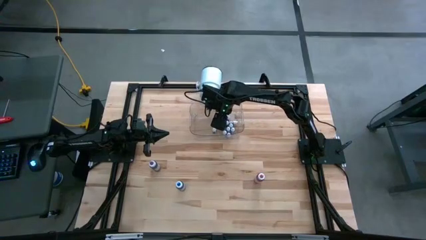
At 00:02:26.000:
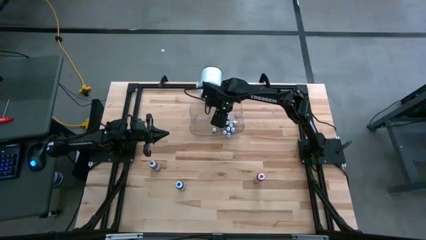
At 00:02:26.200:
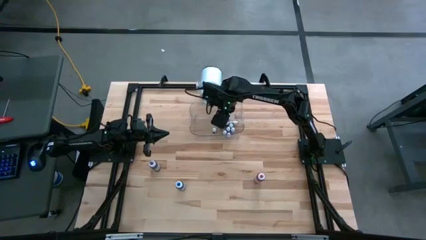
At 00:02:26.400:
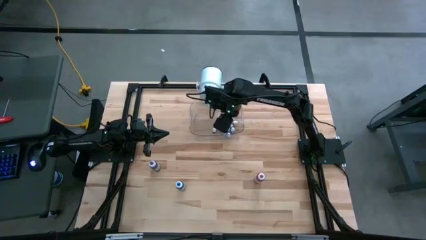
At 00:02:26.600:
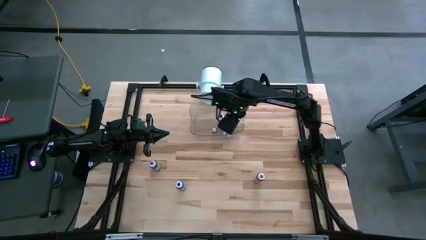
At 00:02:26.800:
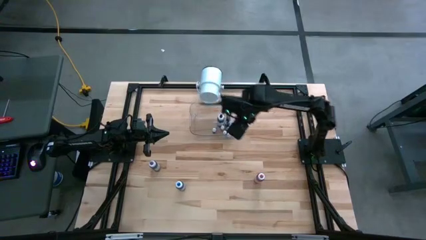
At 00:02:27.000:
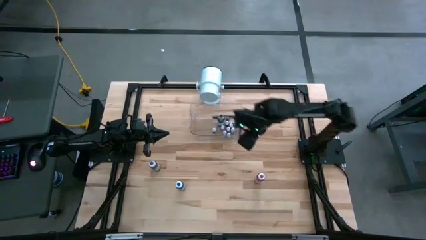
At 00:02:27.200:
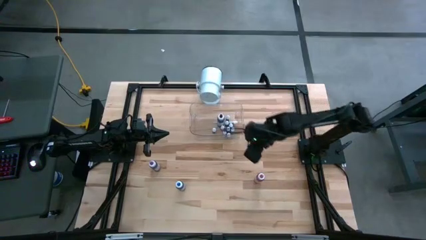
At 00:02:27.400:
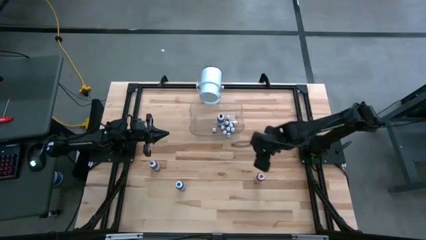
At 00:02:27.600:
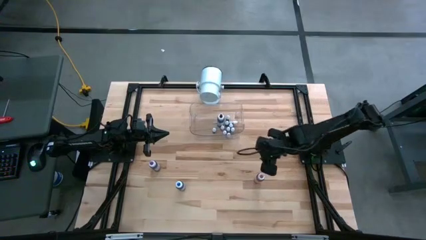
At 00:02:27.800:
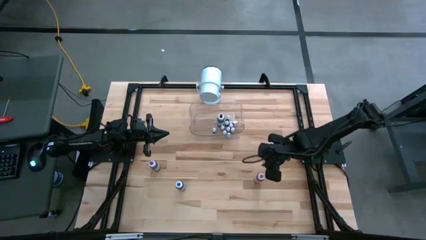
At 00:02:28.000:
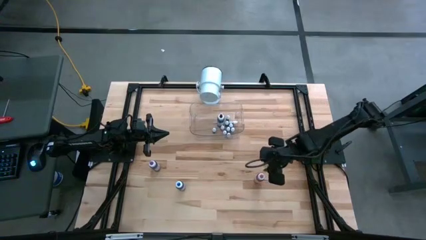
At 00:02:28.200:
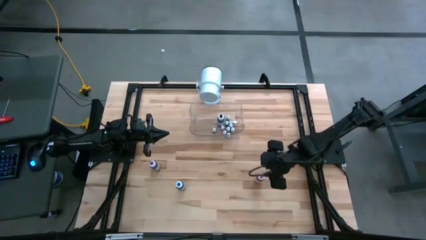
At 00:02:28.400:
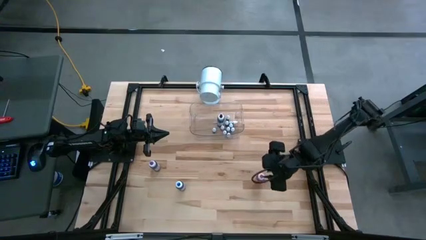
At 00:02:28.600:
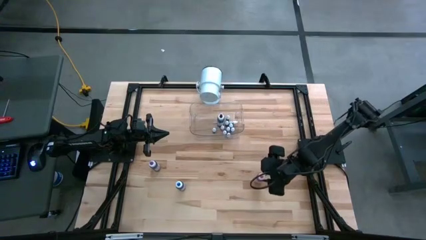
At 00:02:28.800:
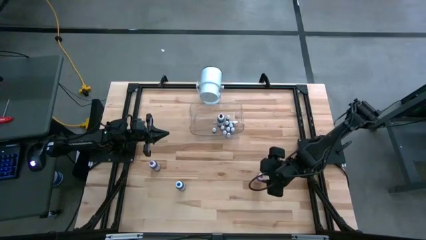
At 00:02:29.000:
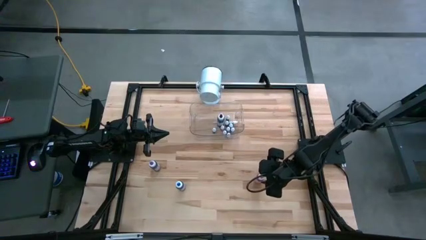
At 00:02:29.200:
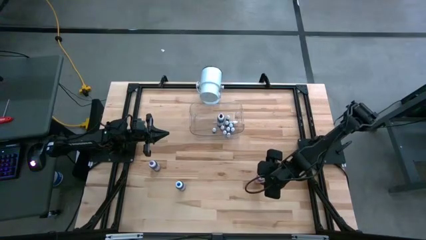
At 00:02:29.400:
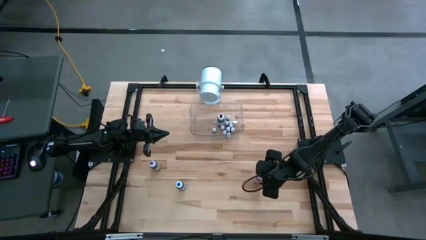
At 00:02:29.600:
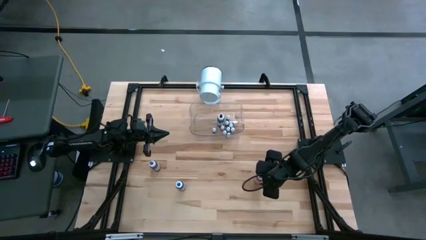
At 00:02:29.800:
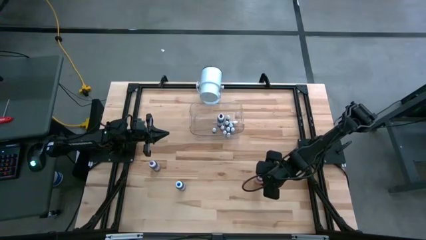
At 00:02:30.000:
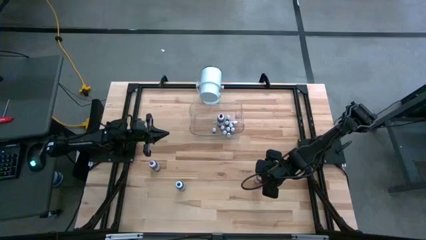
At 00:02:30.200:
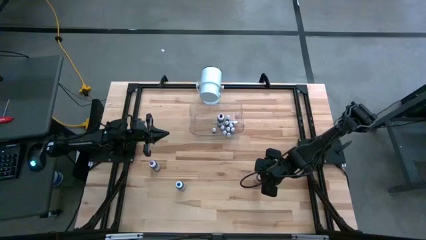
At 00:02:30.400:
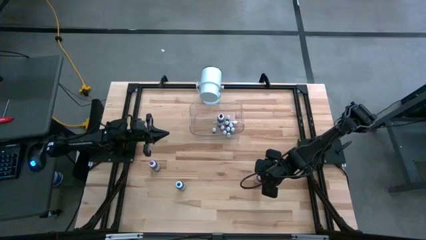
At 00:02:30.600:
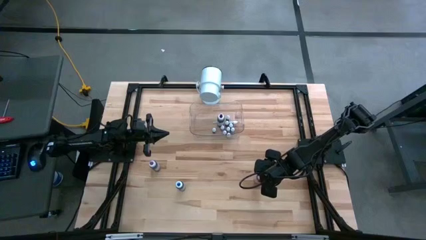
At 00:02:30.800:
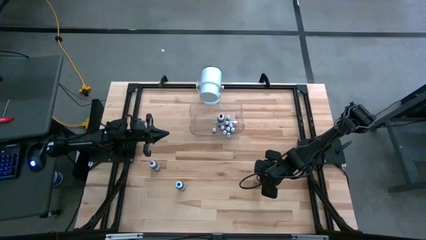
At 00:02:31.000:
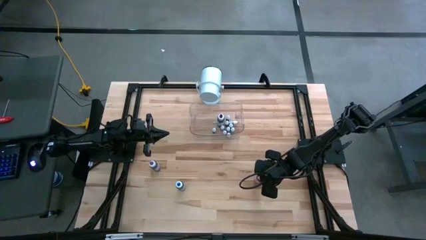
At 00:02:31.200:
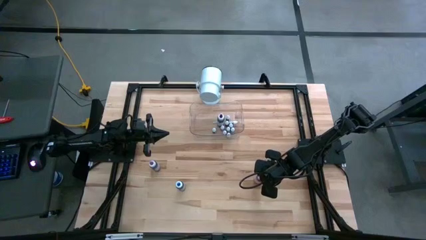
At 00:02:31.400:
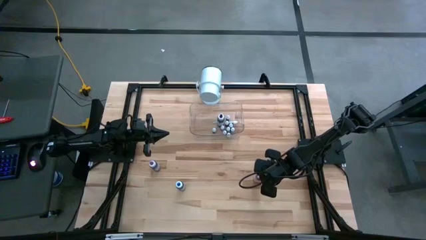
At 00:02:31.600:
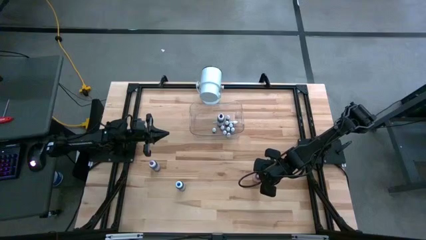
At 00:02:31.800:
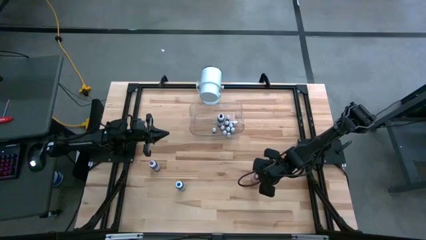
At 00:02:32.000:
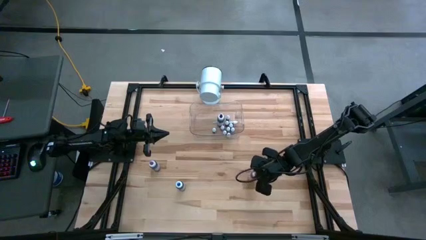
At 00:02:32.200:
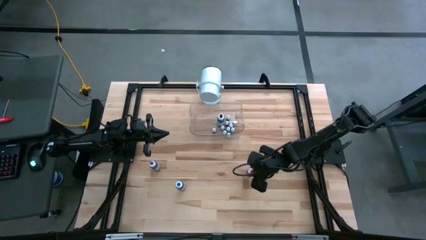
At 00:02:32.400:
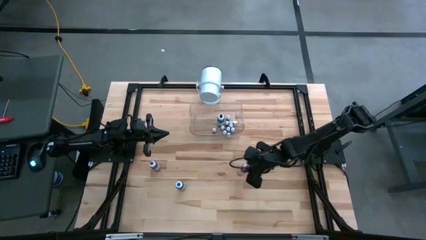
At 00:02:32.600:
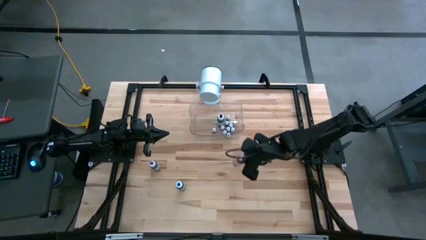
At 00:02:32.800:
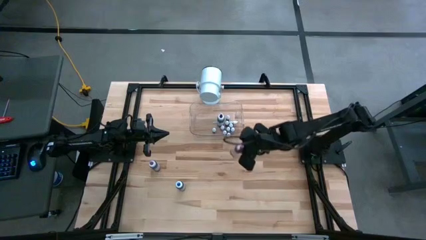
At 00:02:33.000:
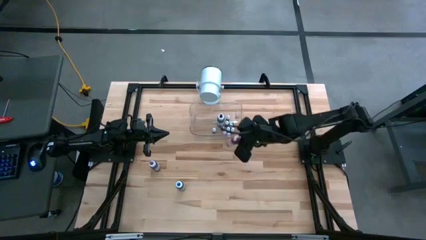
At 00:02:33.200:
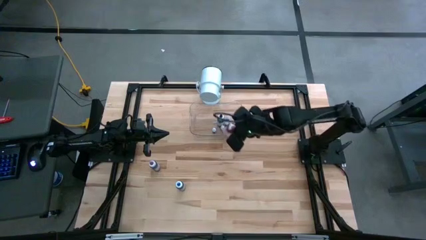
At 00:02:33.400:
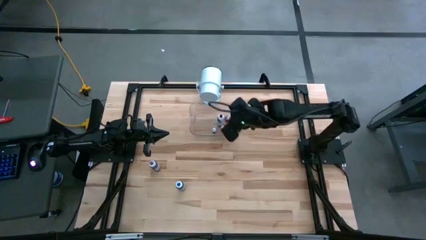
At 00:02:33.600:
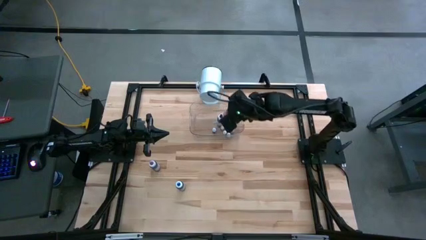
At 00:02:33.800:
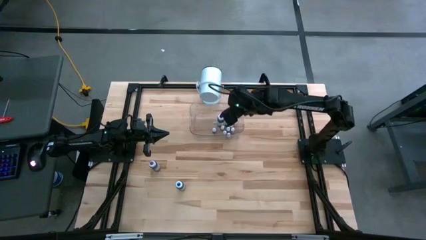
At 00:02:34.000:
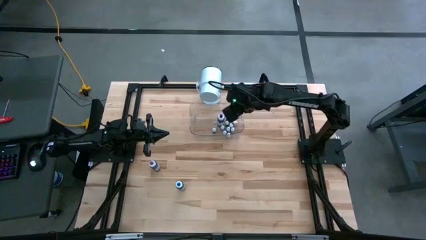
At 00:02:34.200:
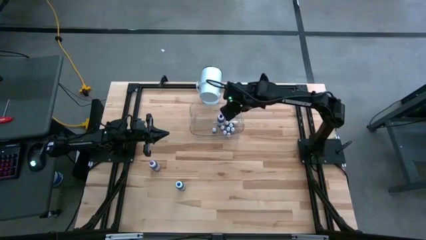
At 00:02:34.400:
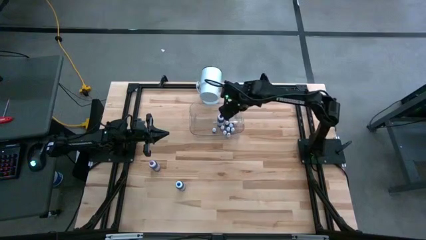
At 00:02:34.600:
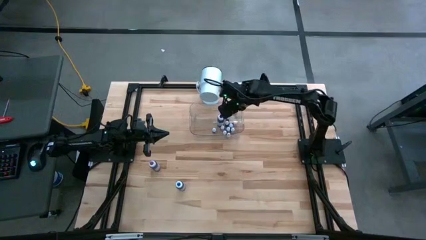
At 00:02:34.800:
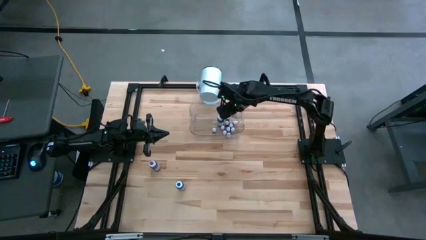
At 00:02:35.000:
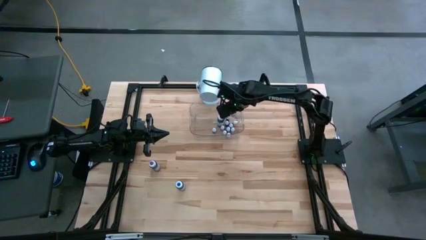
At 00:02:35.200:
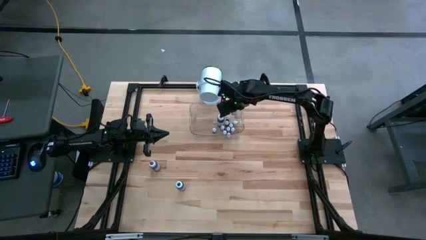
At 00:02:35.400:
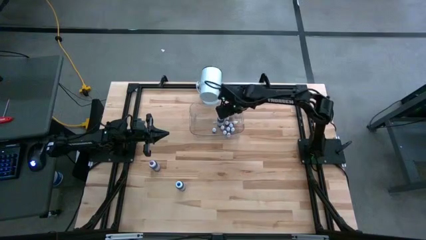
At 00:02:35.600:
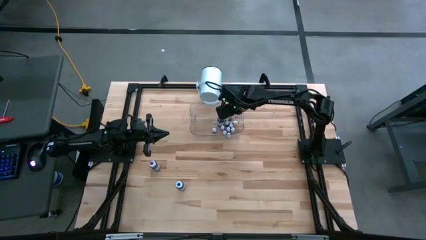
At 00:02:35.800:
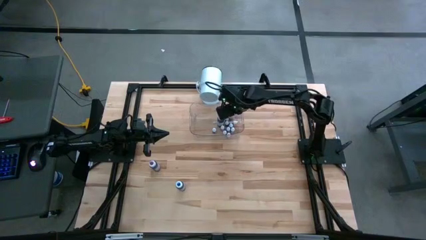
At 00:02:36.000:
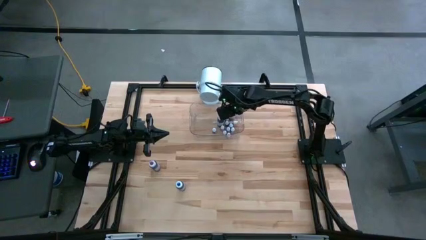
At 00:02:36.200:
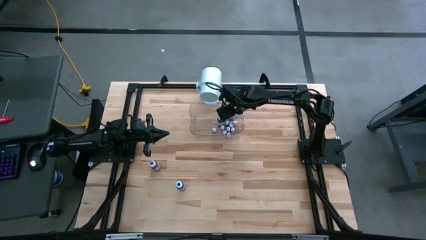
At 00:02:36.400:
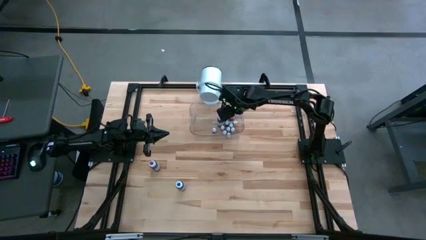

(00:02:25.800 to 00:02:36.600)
Task: Pick & Place food coloring
Put the large pink food coloring bottle into the transparent bin

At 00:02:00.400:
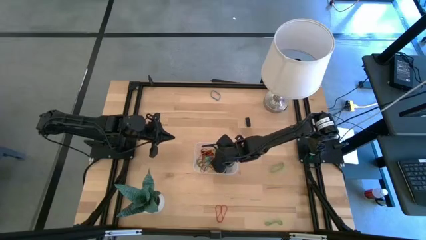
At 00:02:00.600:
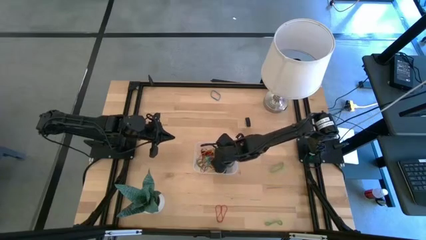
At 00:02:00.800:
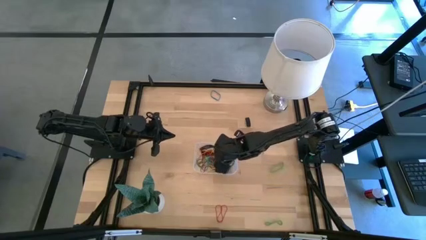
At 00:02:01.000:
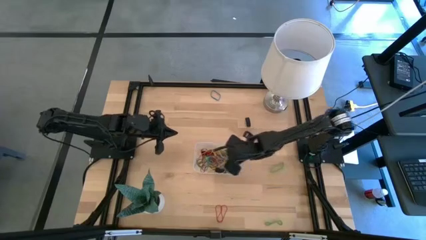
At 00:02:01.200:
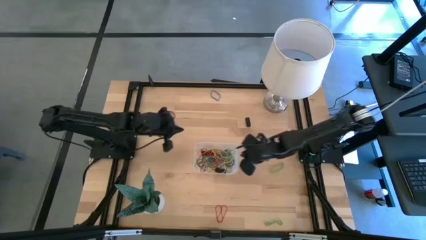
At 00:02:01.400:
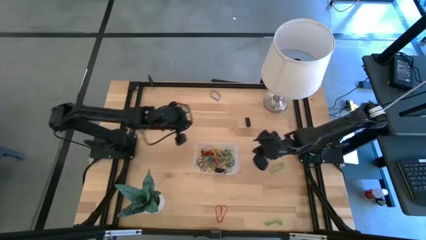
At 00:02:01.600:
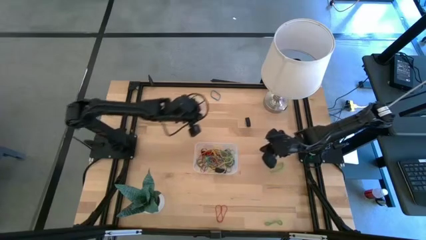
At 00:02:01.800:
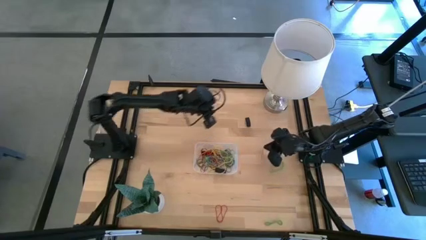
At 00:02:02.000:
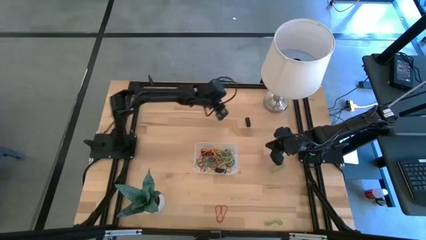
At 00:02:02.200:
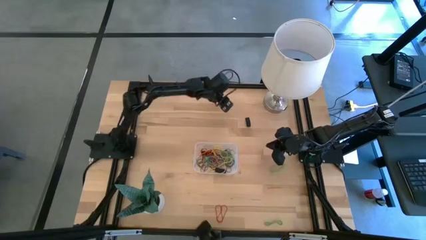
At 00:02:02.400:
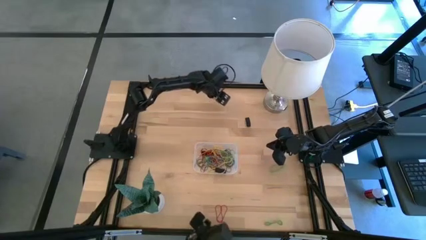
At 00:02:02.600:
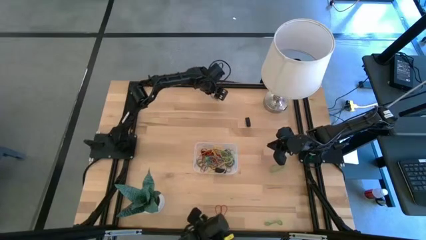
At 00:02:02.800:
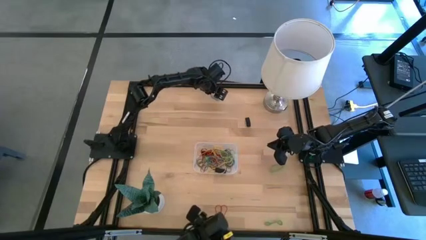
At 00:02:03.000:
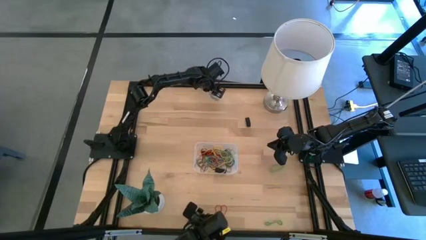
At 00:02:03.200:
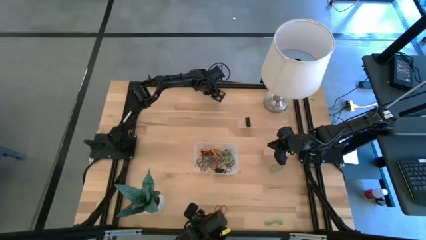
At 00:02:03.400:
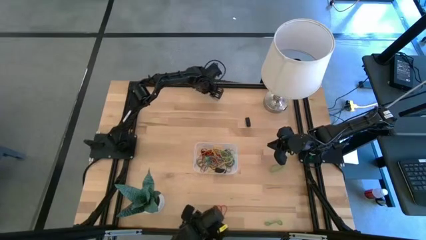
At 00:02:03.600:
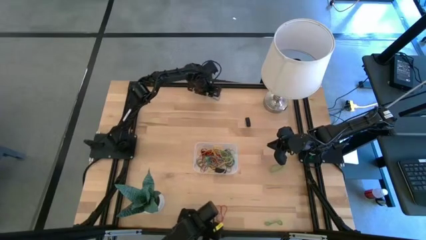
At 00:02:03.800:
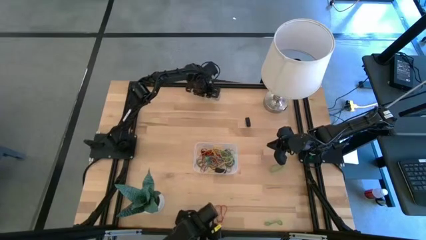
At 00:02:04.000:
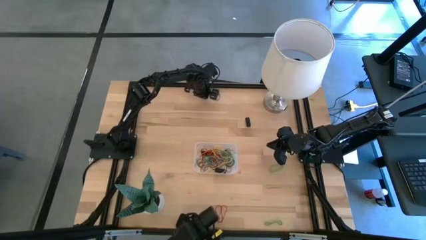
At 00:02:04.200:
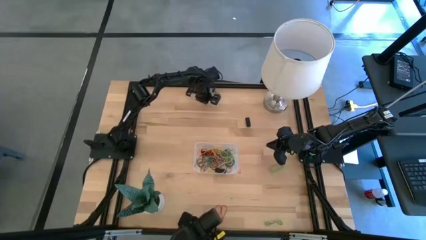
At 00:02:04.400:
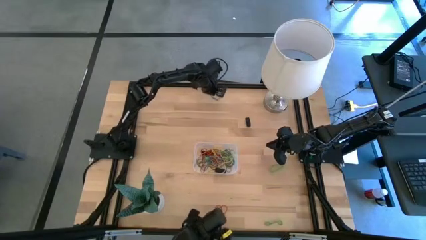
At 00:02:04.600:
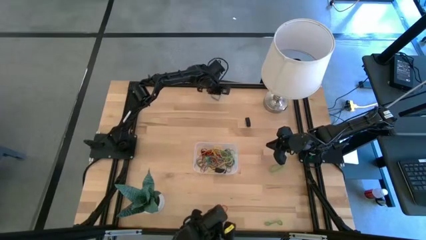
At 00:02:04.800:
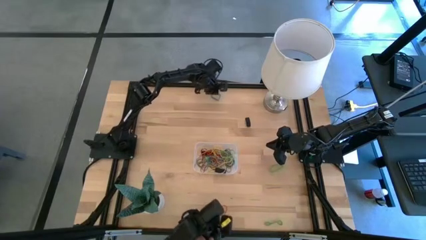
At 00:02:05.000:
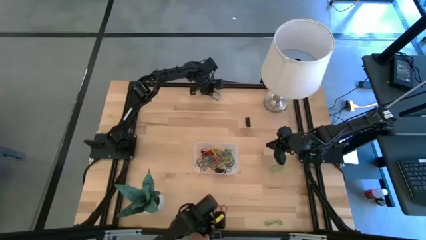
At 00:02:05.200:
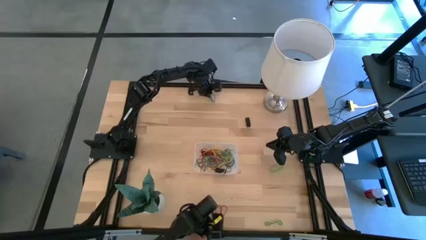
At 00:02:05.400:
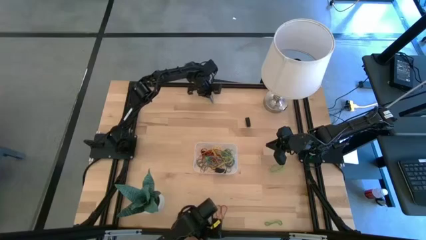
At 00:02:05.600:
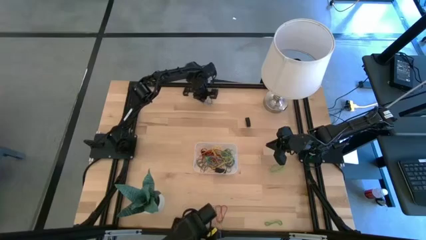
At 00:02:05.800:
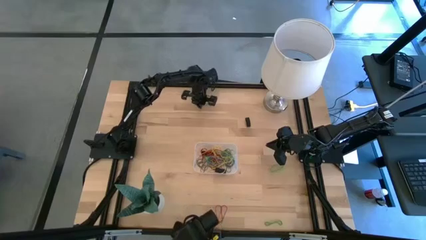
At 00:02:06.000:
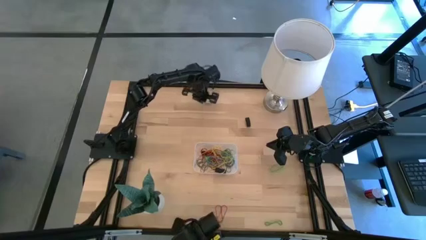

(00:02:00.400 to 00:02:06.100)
Task: Pick and place rubber bands into bin
Put the blue rubber band into the transparent bin
